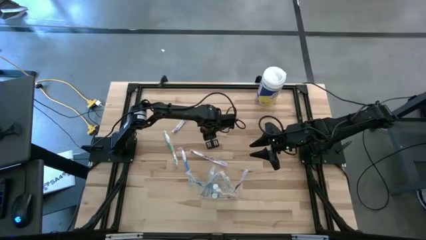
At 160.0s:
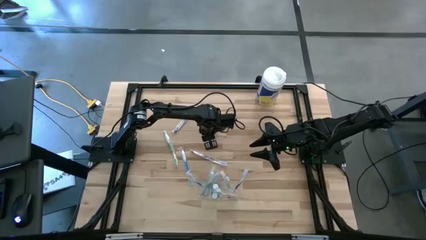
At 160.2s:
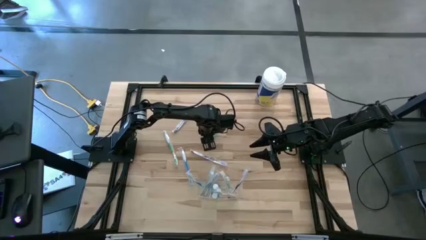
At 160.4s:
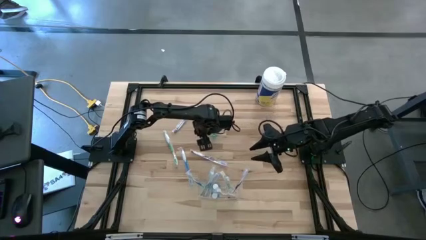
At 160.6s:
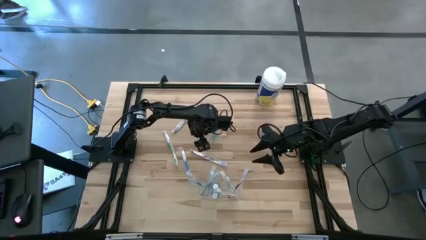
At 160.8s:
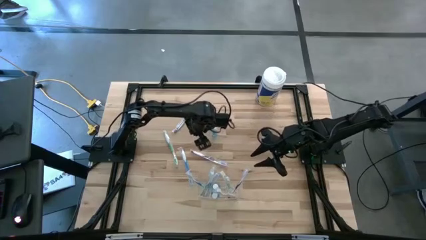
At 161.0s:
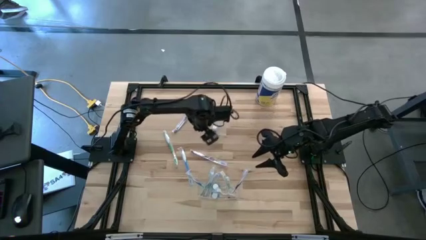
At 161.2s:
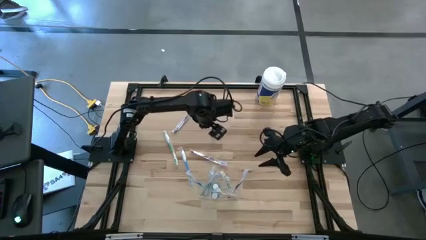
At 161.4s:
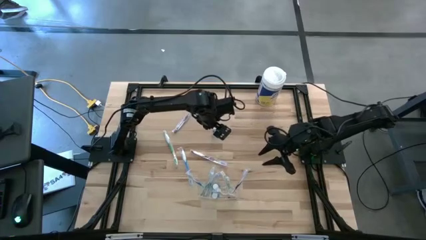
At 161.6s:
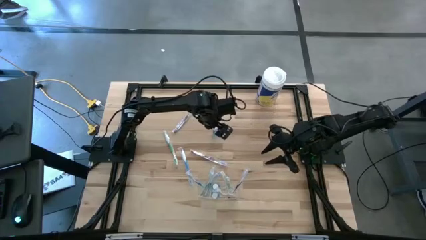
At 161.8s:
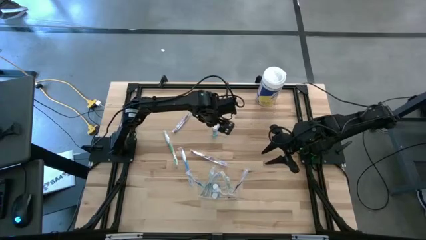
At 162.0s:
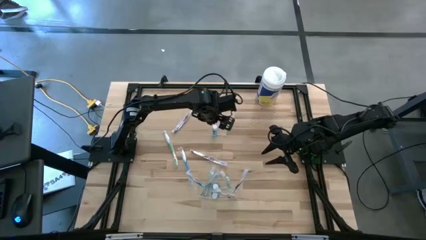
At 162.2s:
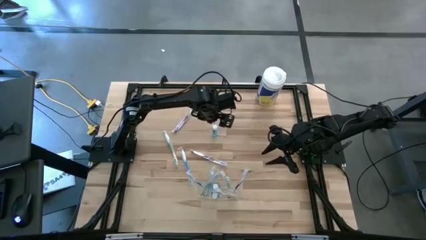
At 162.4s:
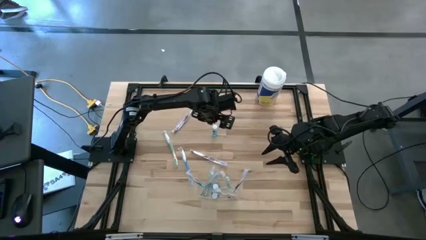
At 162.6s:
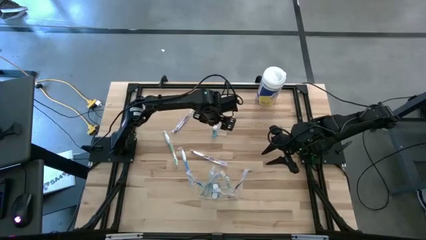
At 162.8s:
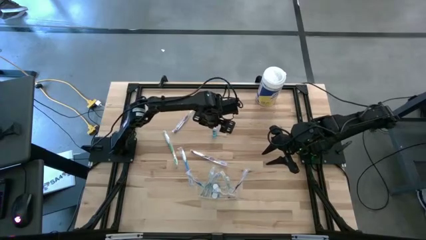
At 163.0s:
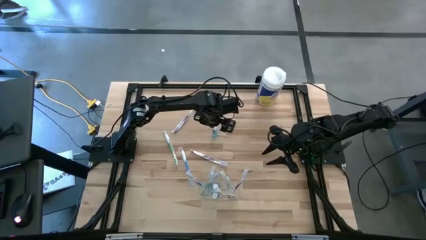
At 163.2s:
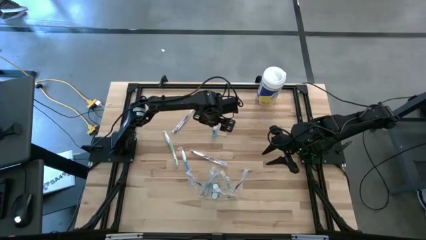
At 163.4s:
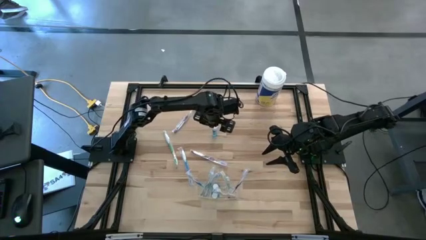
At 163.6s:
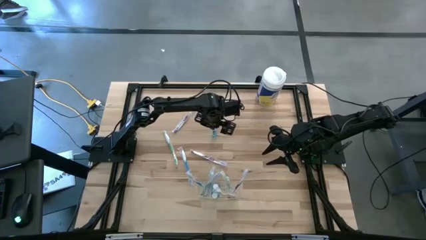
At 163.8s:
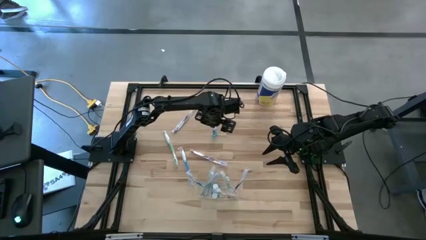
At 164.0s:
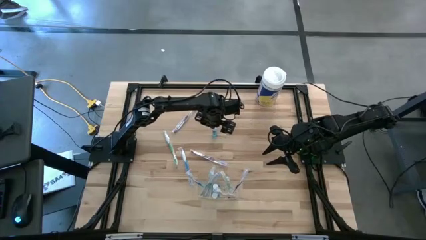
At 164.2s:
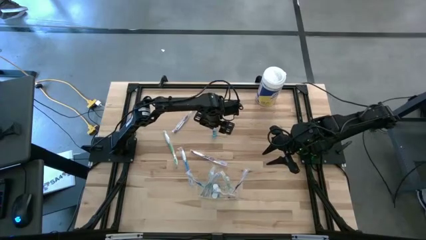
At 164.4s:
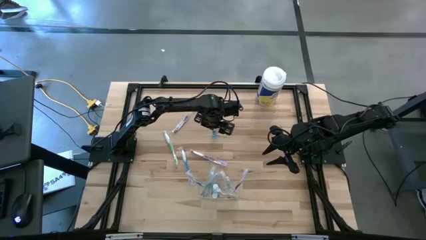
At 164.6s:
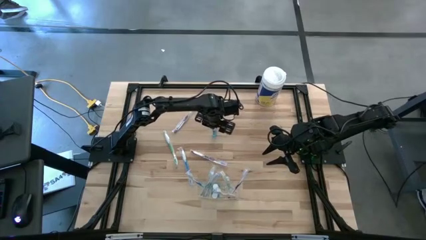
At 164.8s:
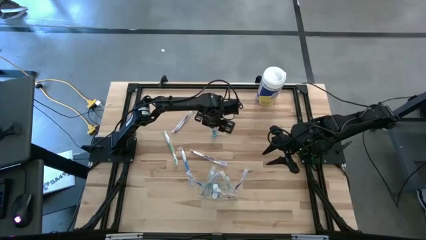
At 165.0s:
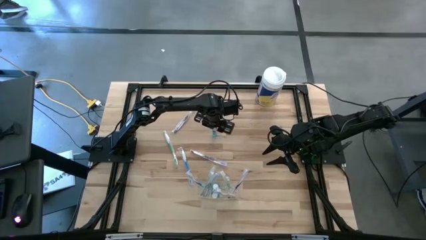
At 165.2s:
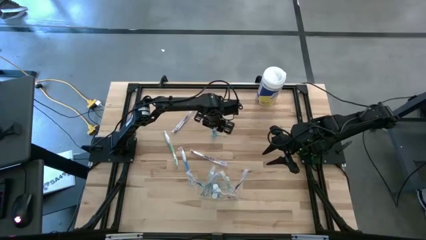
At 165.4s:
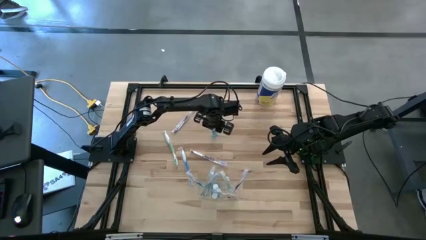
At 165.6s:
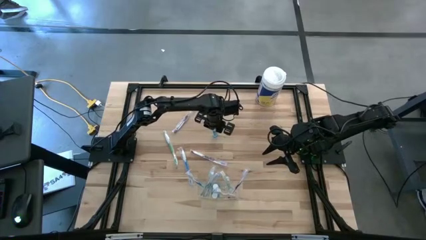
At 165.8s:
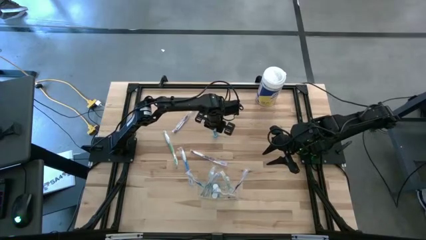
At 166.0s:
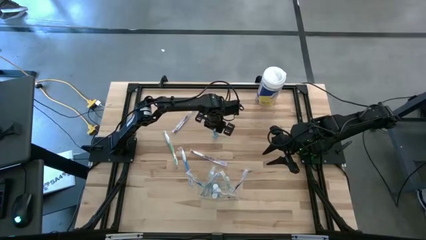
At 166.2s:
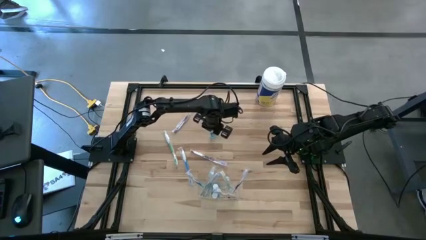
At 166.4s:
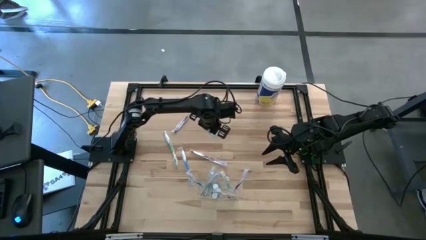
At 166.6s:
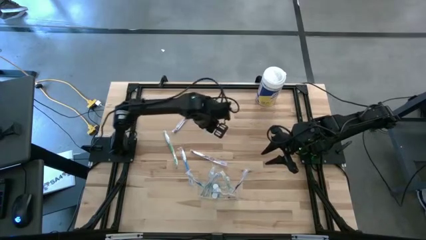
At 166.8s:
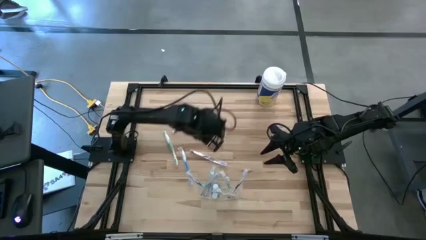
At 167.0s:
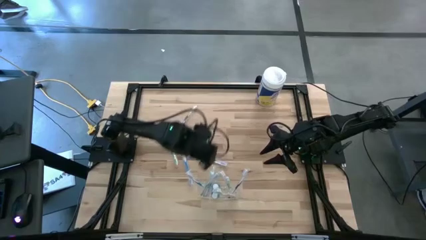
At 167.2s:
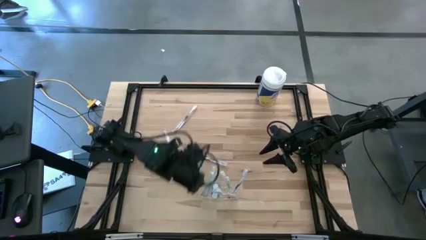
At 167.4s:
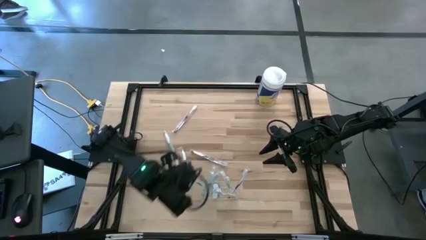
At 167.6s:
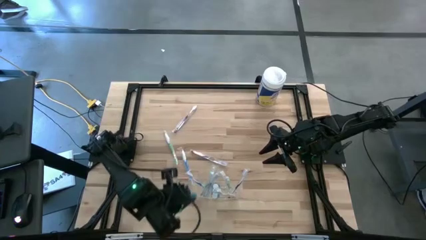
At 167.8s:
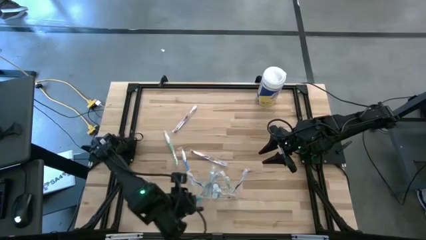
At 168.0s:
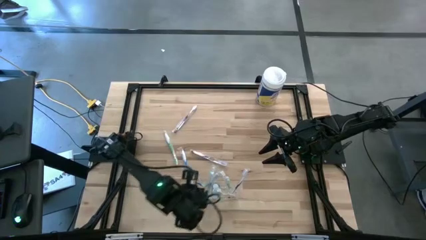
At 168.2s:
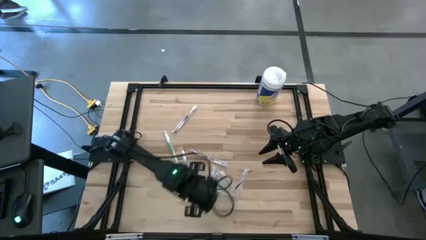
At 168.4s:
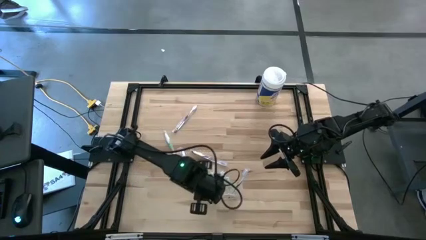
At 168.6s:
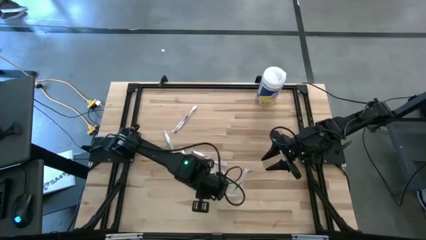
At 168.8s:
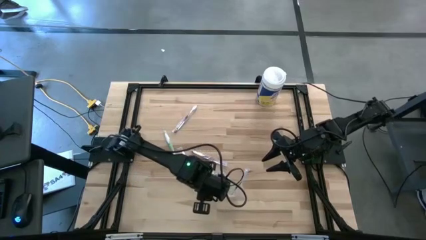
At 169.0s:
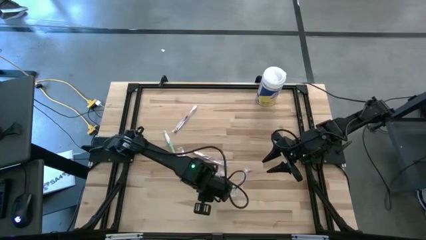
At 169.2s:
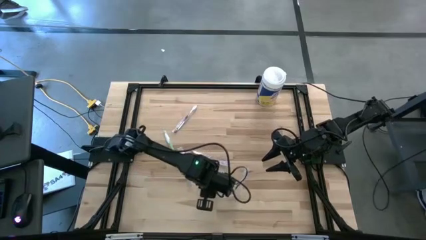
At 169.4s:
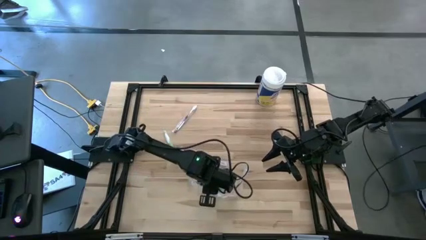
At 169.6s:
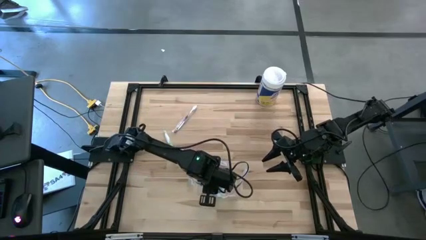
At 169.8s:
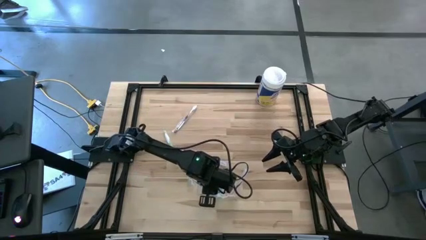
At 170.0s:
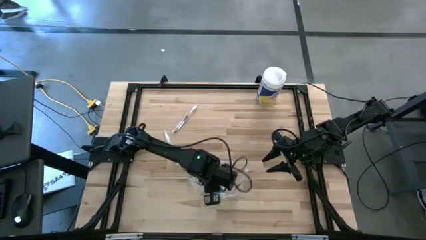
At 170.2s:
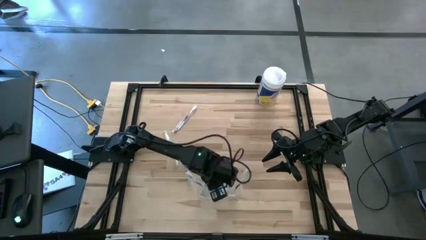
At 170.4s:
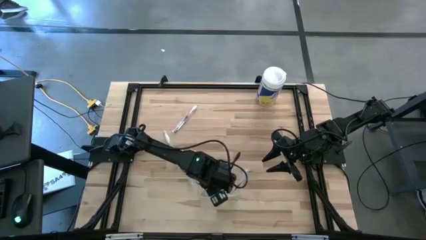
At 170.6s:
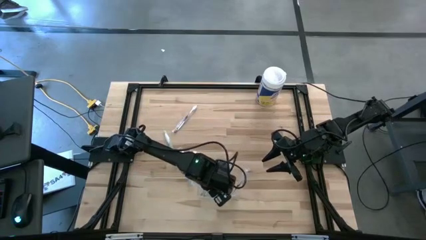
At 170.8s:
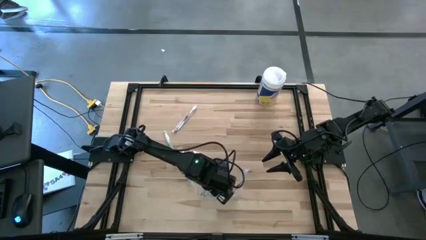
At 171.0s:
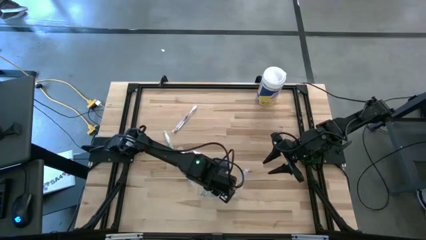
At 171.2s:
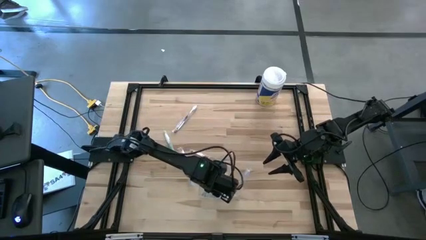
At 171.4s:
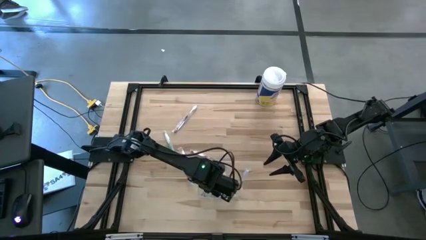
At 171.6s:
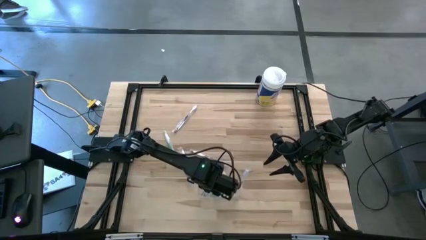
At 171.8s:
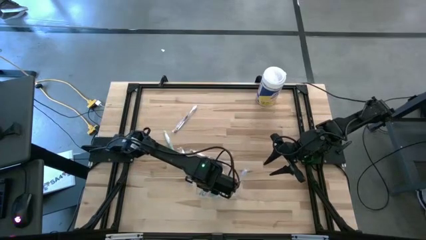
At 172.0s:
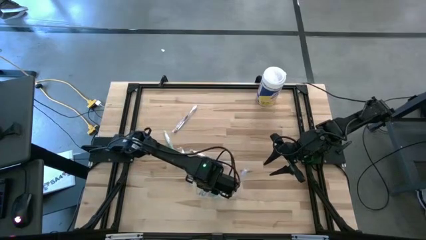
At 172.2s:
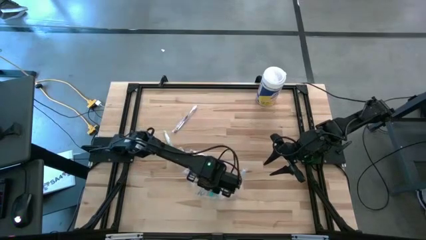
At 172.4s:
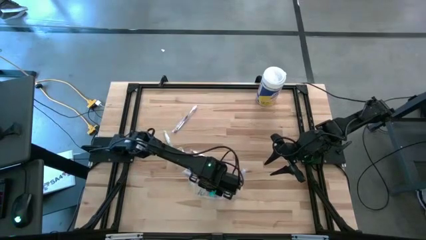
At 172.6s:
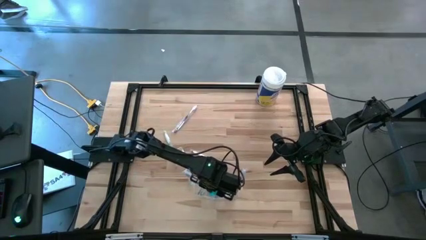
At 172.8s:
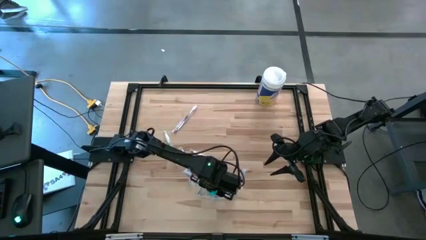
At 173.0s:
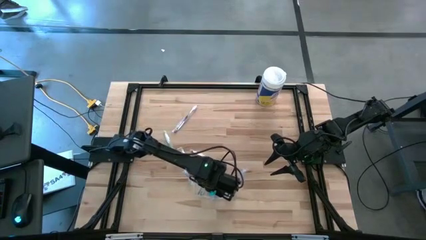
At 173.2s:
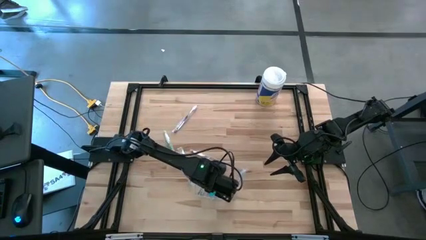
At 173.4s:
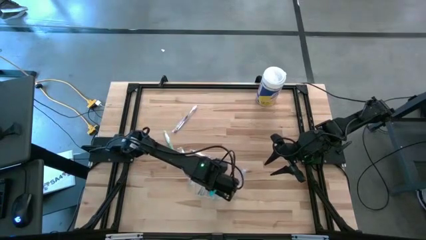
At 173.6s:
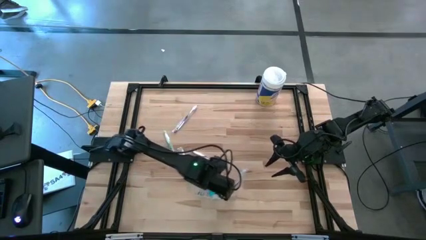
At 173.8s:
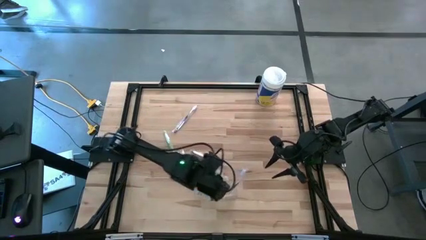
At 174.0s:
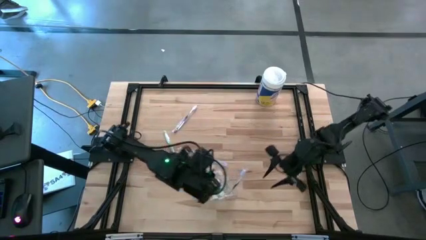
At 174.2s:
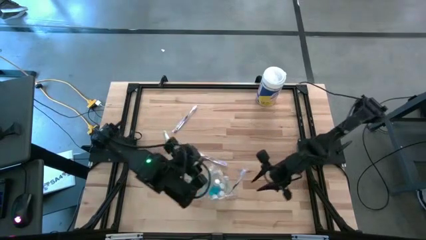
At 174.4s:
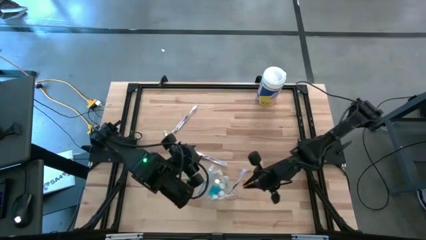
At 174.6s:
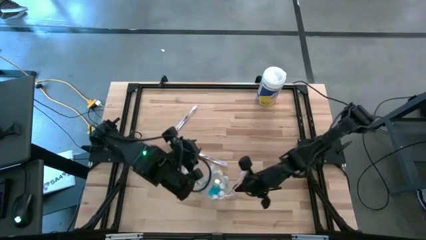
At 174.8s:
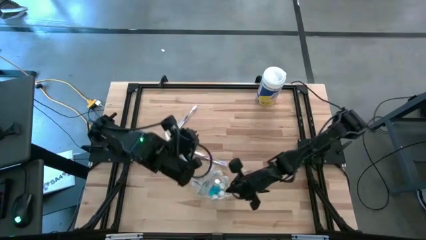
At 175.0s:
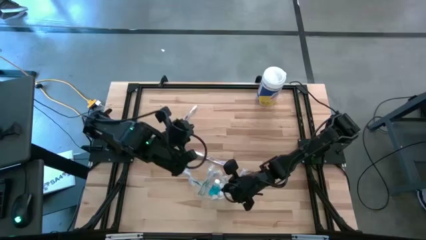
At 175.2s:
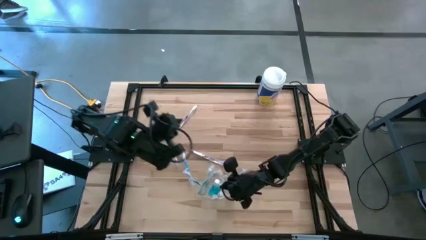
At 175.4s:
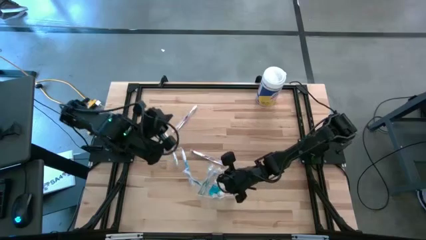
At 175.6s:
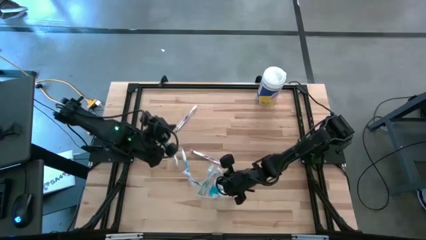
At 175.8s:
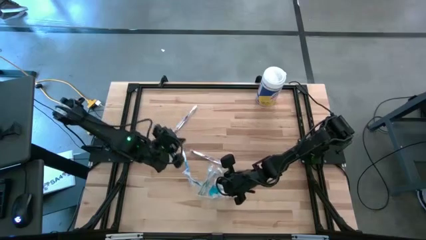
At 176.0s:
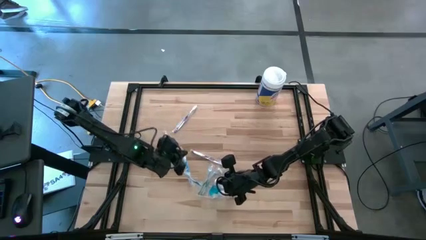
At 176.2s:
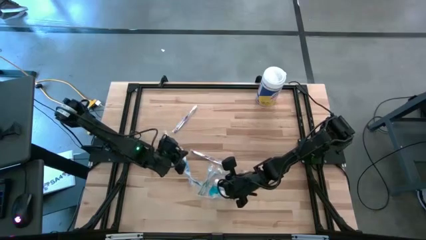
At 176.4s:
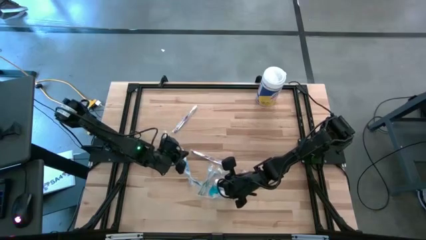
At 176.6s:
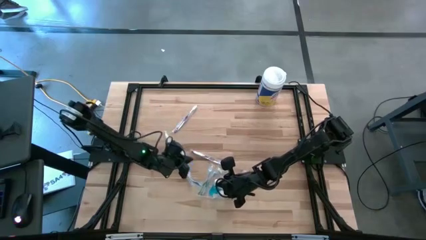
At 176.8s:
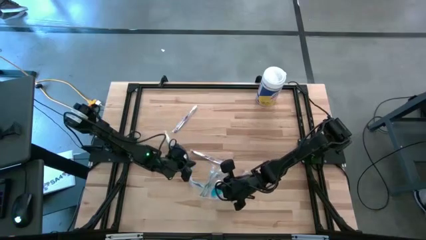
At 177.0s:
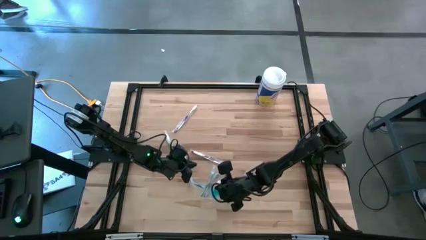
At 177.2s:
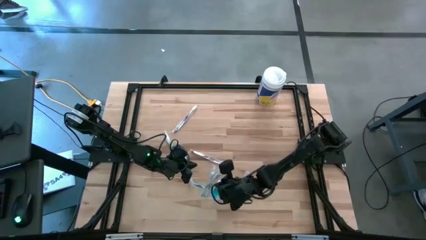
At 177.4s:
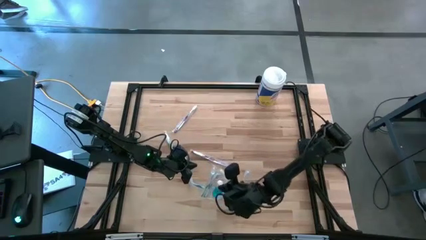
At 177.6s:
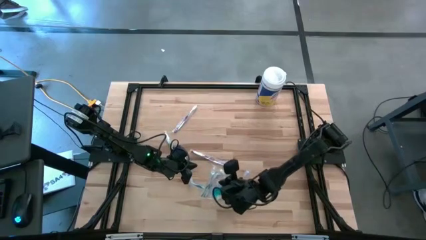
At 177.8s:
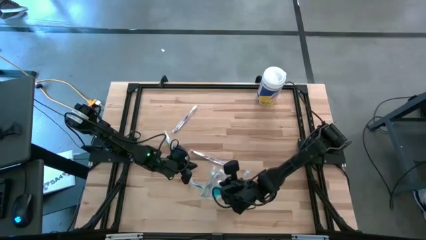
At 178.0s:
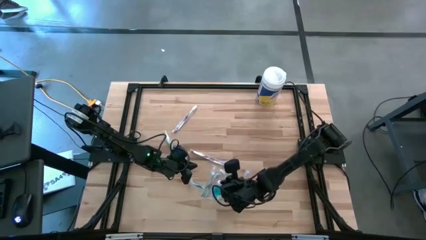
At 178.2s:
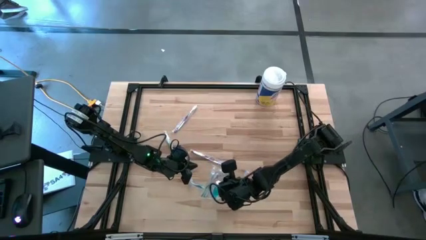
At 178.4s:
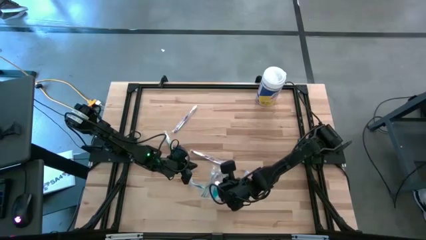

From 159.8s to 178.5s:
Task: Pick & Place toothbrushing station
Put the mouthwash into the transparent organizer
